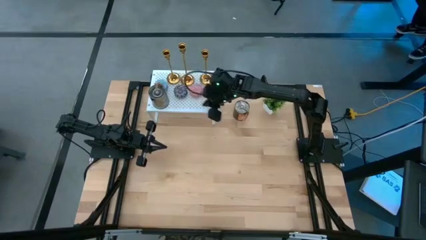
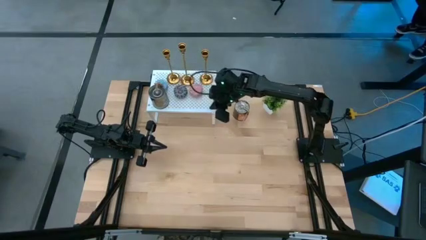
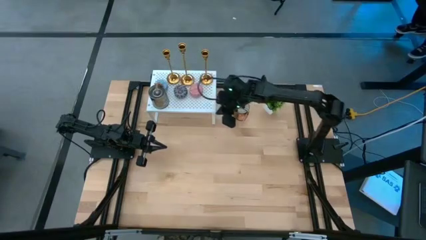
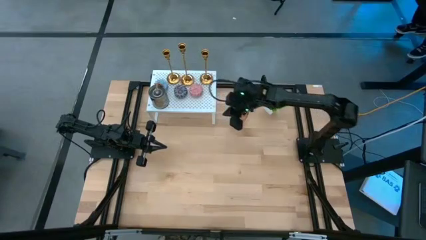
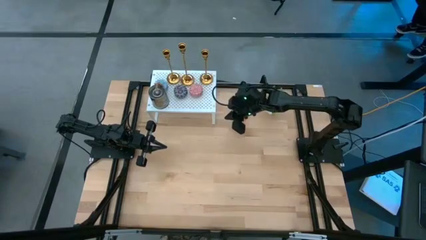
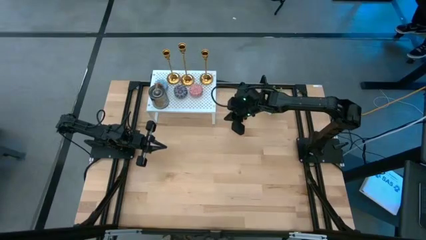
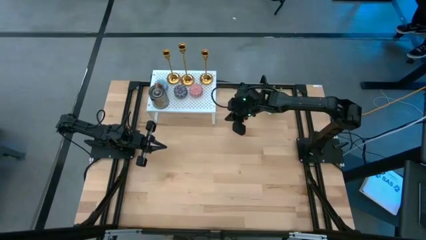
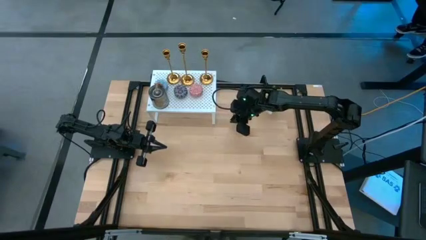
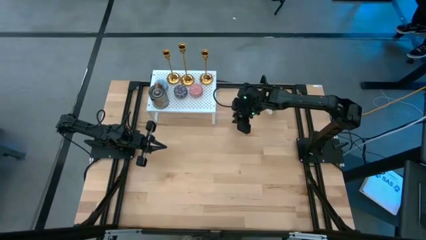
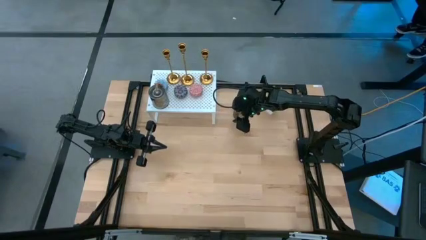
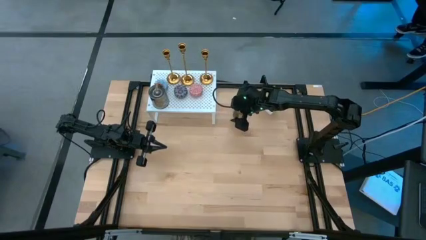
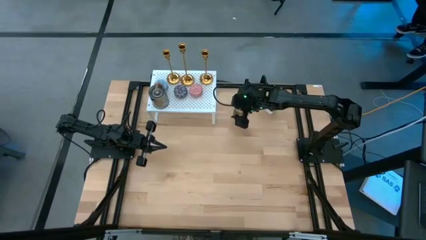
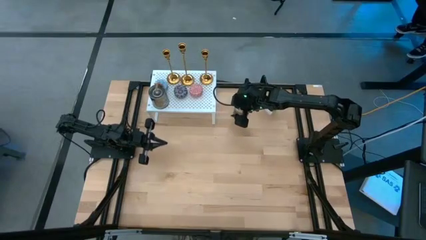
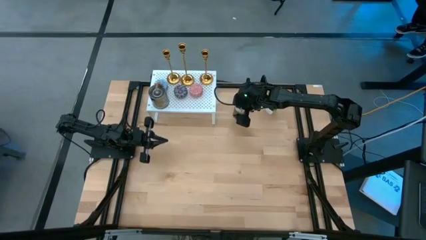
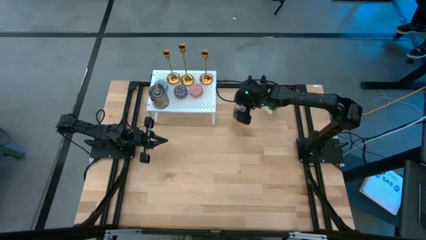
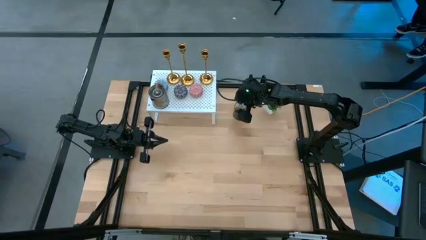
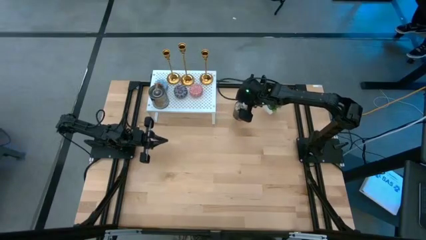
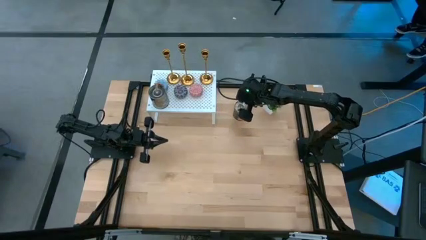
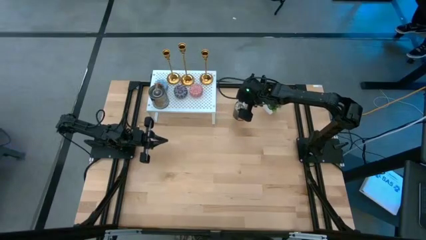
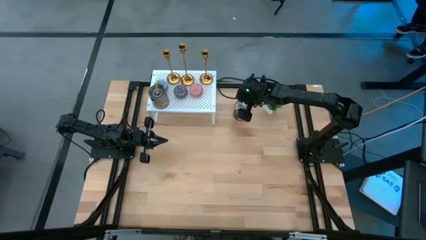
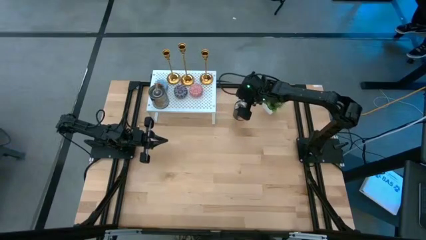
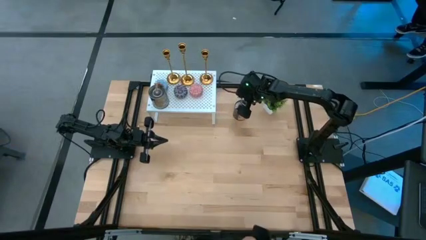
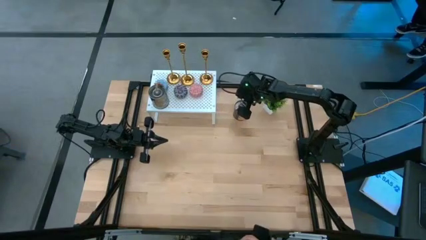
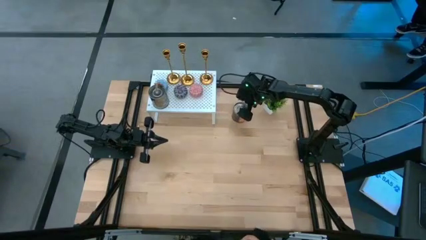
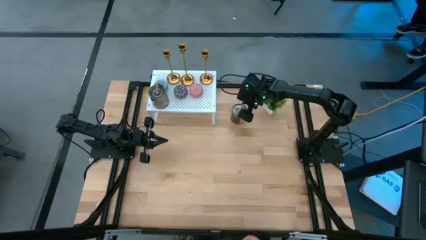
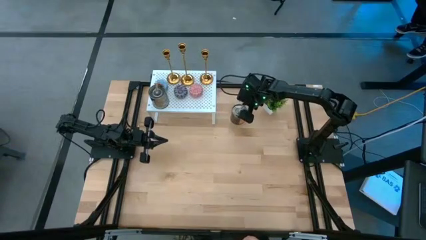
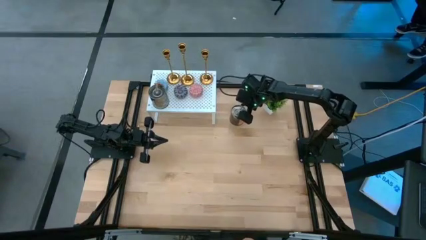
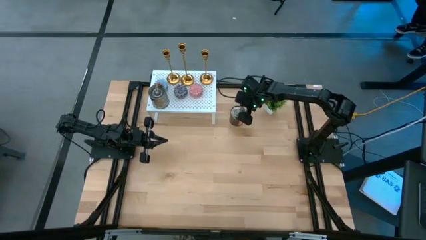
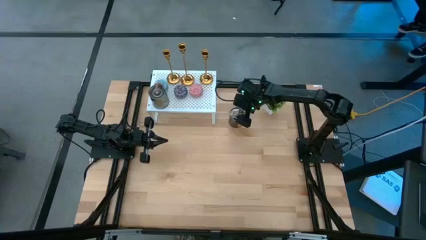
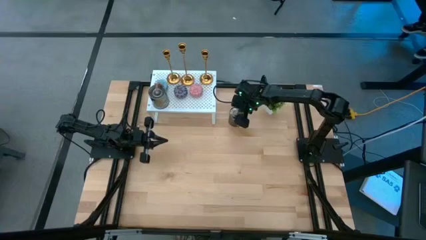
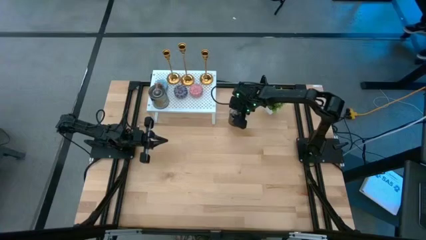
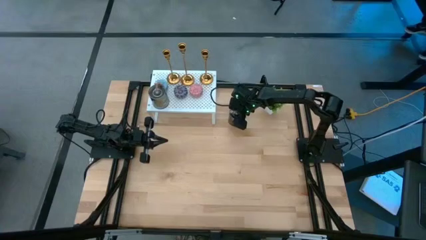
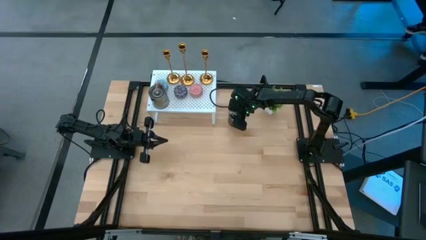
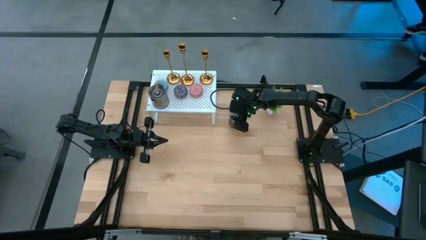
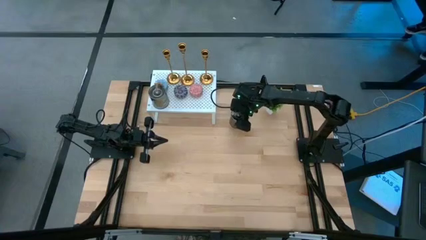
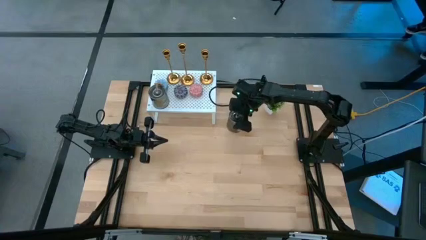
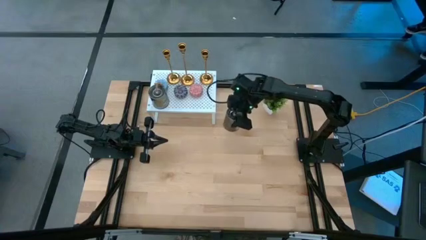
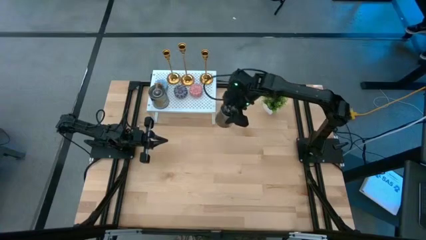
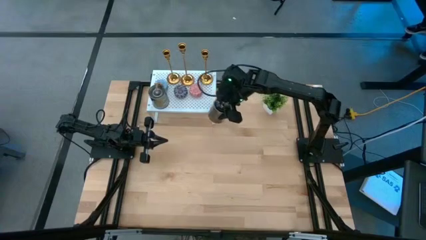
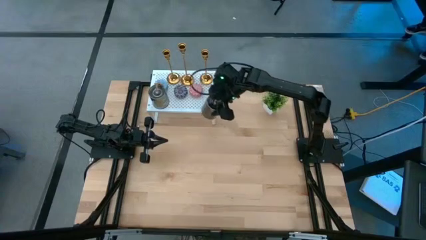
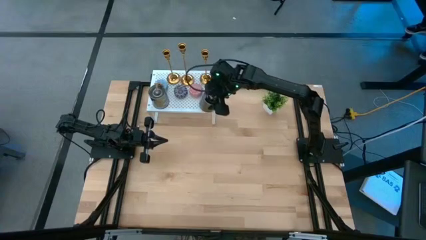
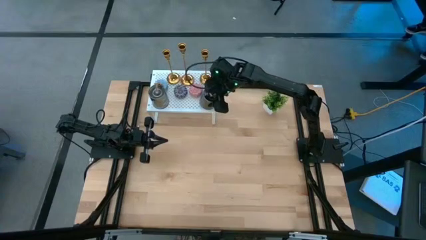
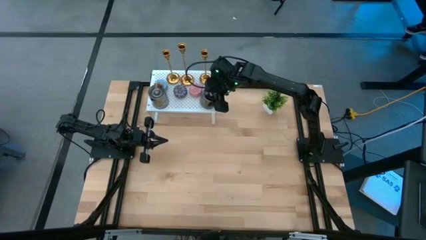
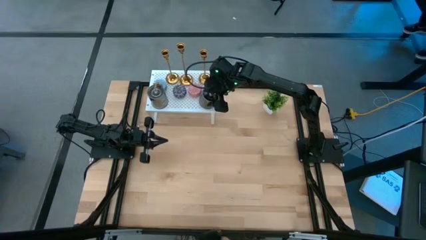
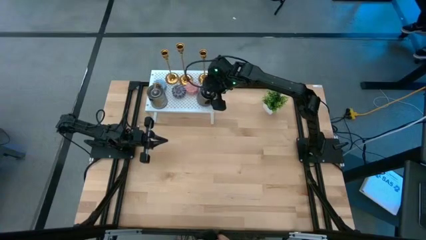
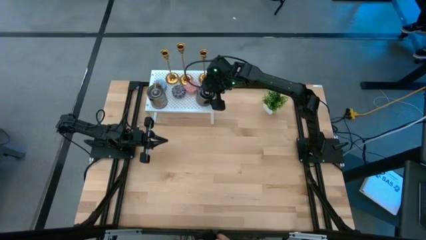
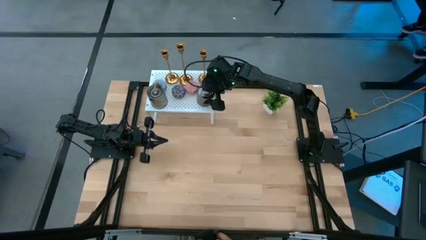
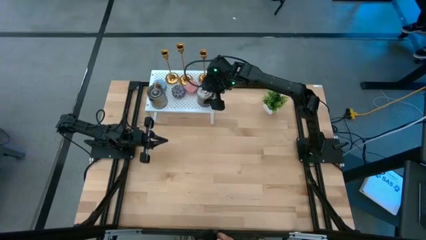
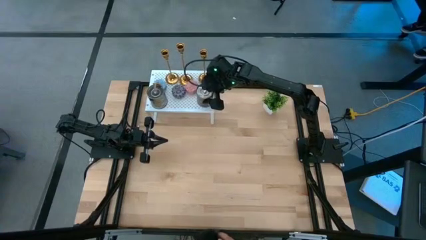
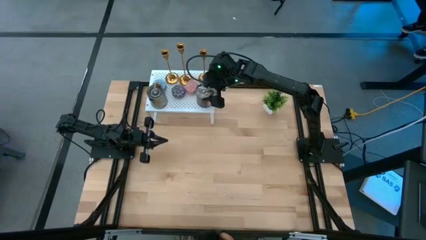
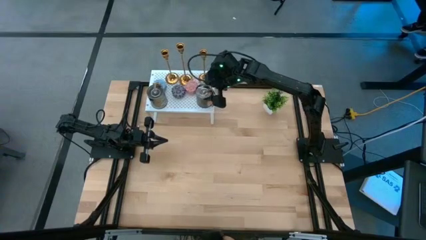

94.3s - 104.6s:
Task: Pick & Place candle stick holders
Put the candle tin on the shelf

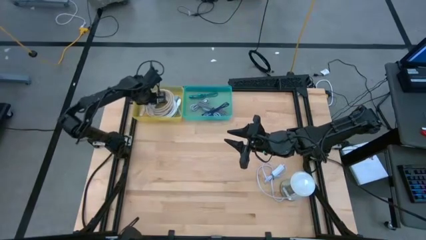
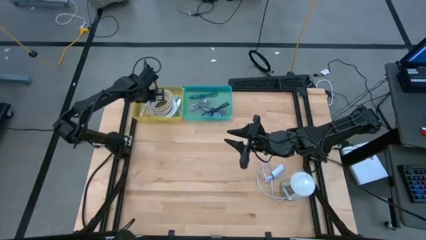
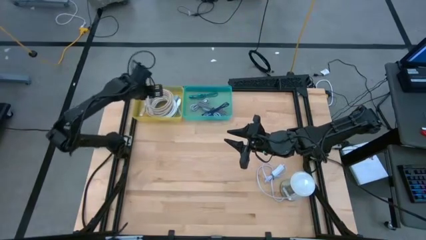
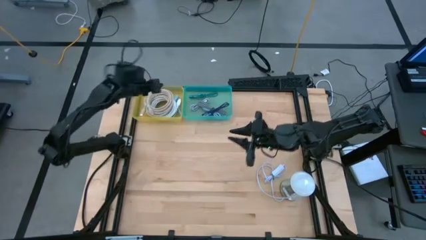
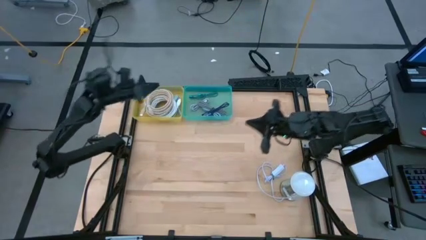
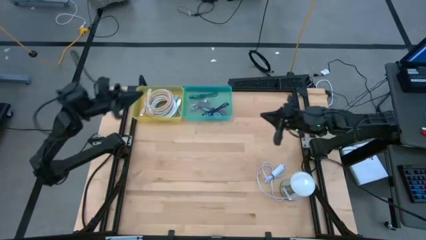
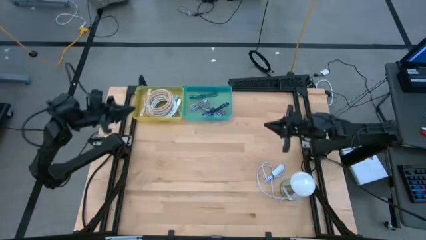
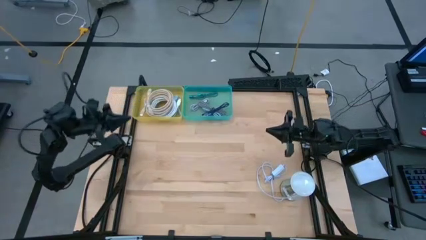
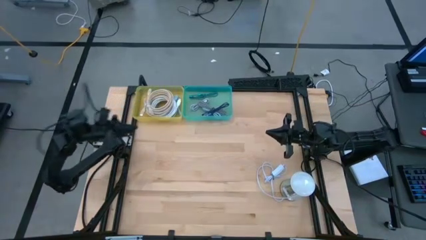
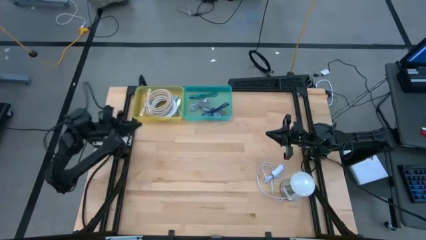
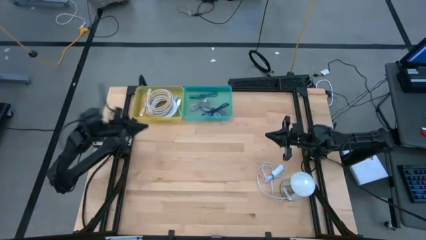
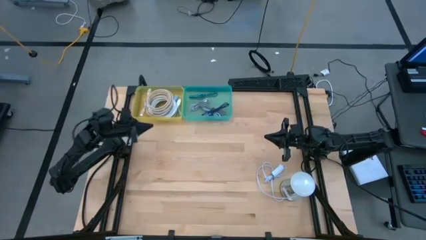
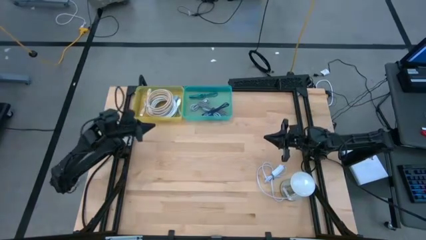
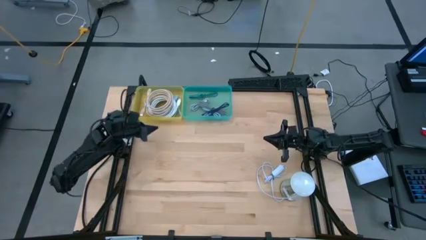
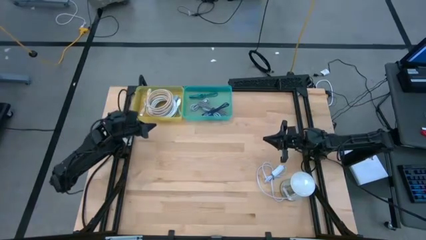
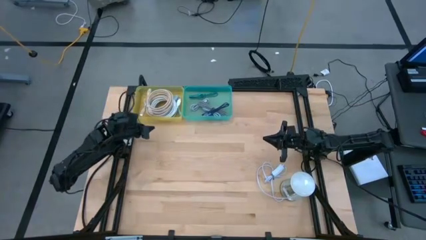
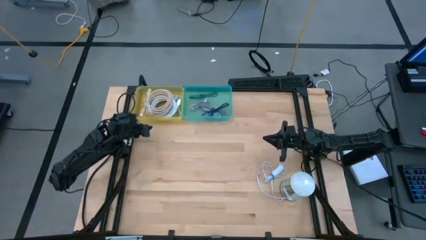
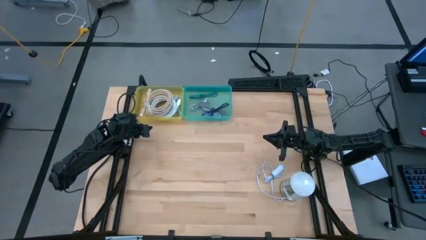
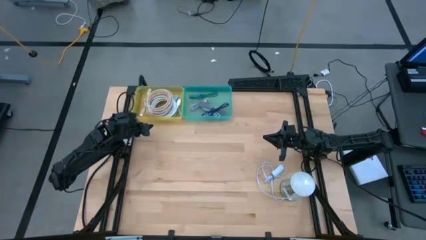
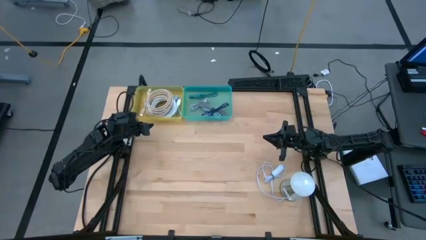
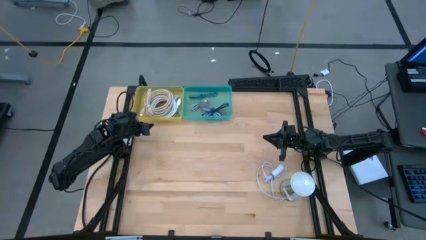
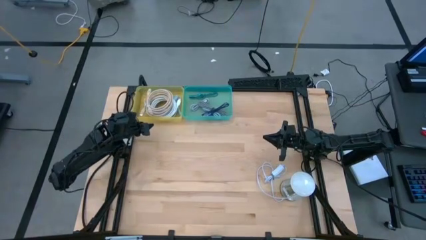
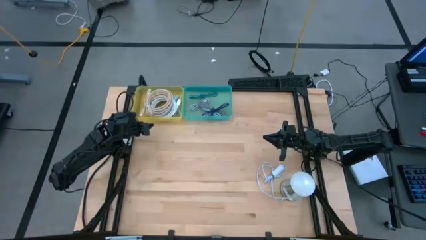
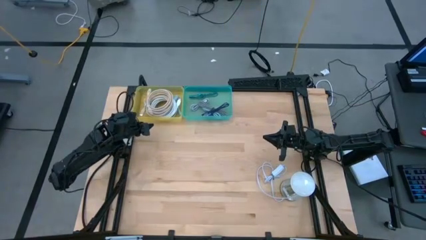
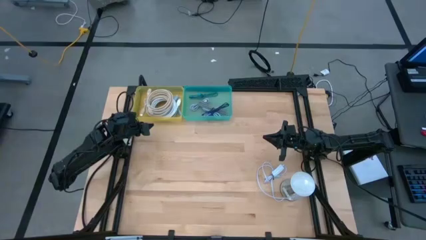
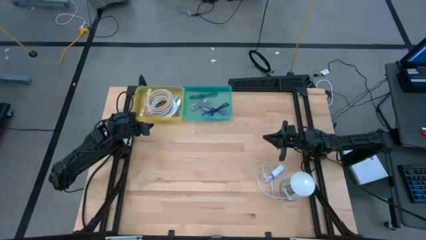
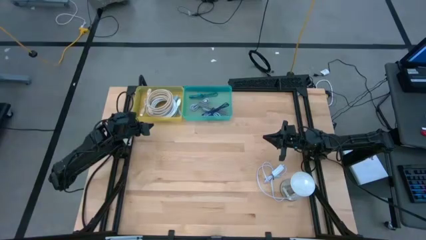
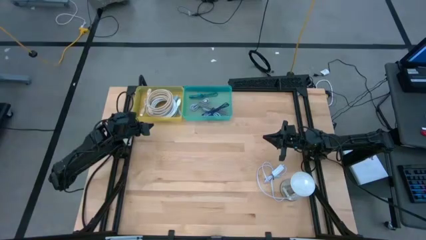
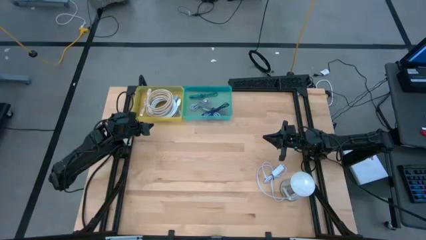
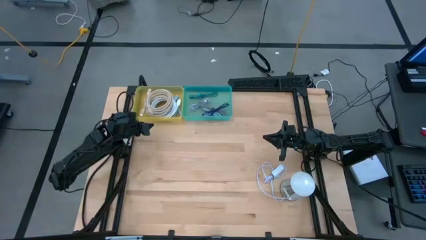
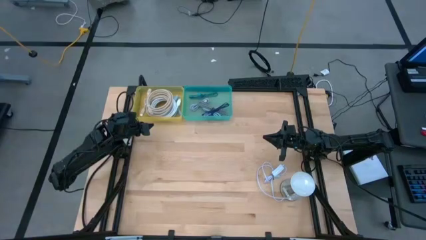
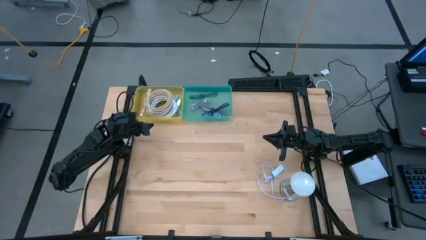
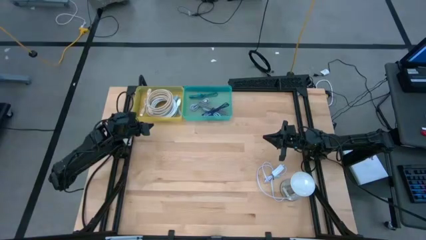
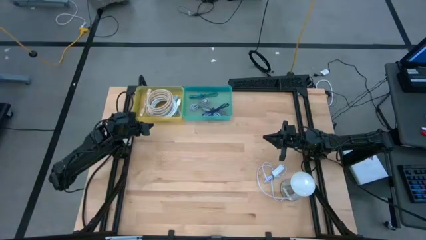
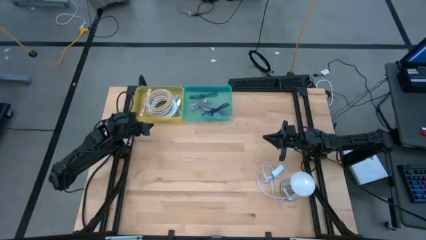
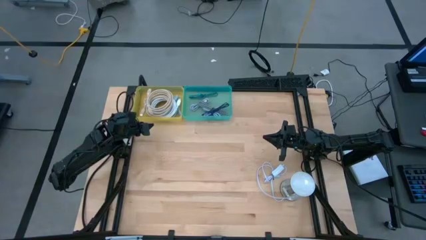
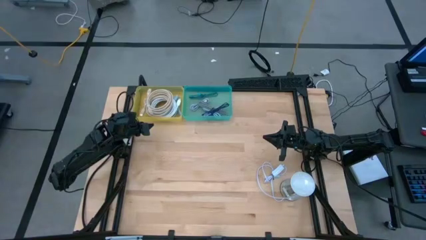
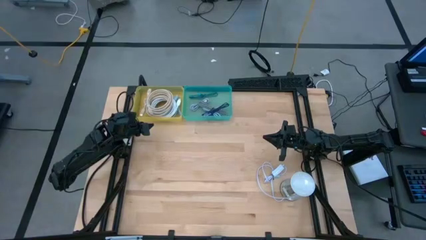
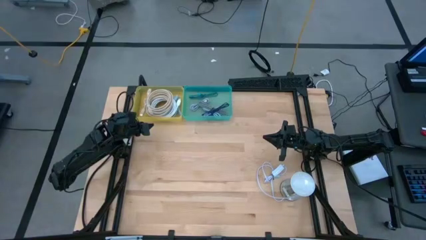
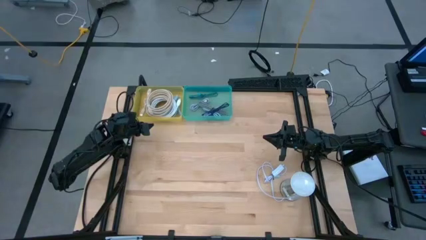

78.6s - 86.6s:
Task: Pick & Place USB Port
Return to Home Position
